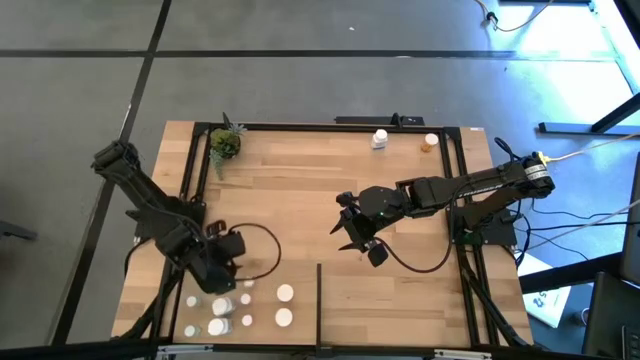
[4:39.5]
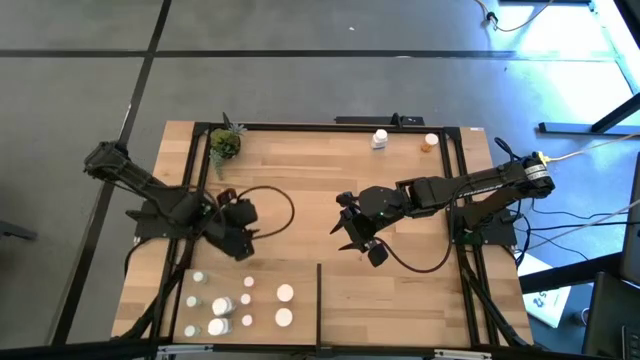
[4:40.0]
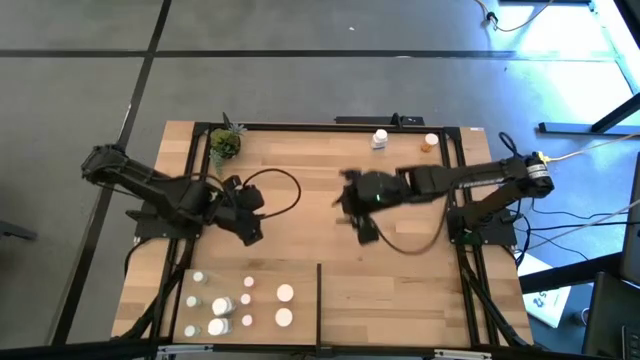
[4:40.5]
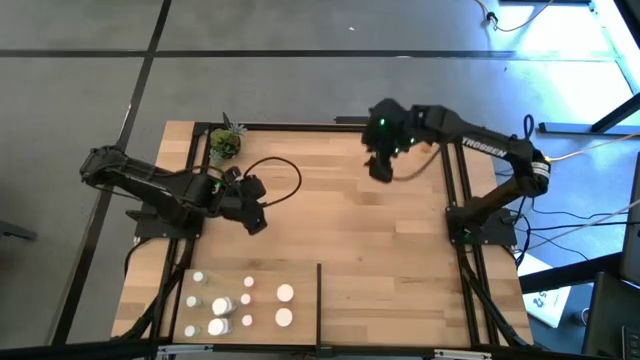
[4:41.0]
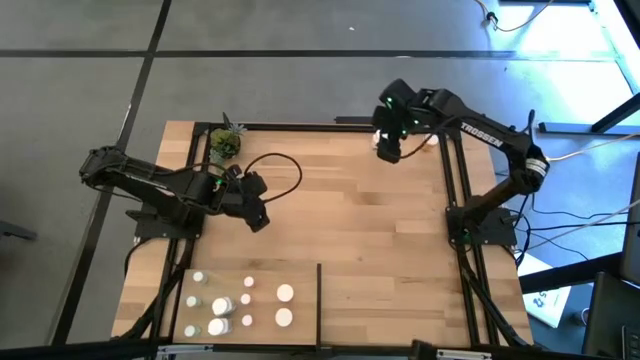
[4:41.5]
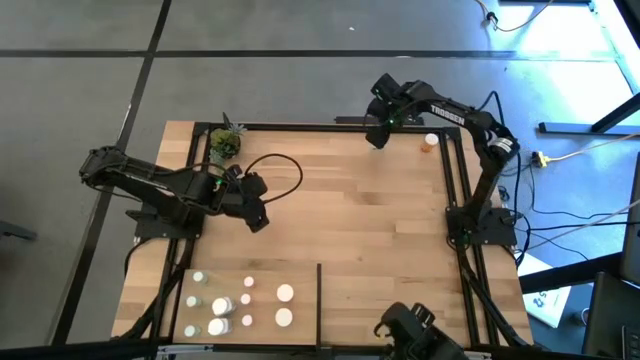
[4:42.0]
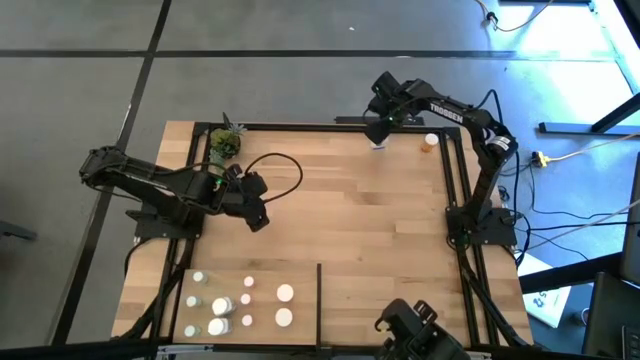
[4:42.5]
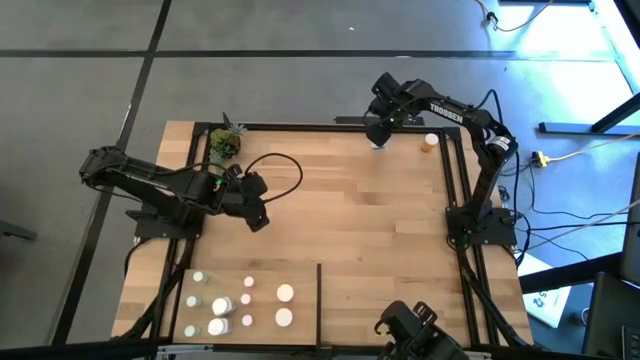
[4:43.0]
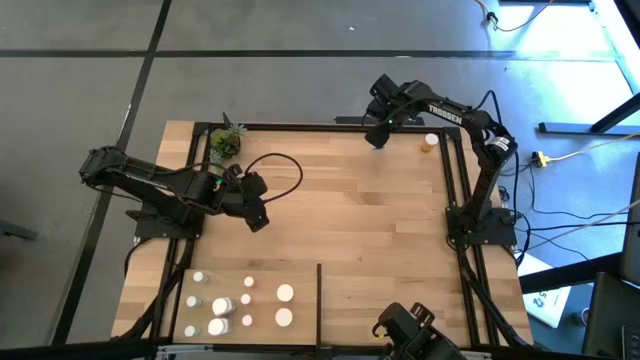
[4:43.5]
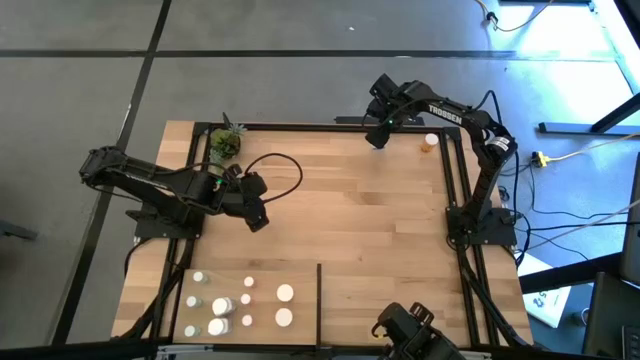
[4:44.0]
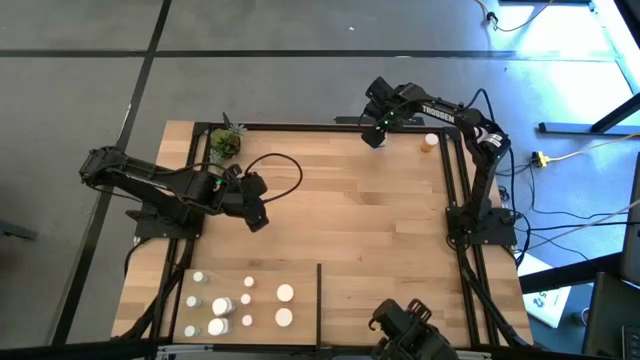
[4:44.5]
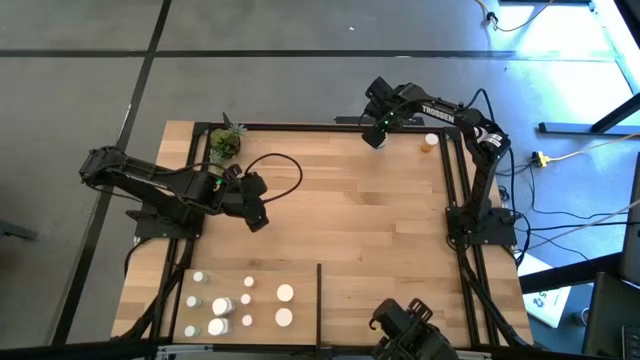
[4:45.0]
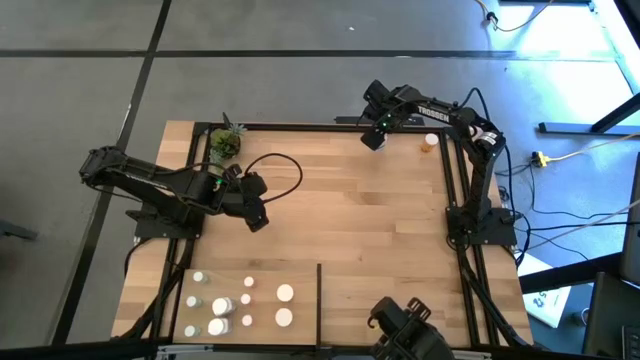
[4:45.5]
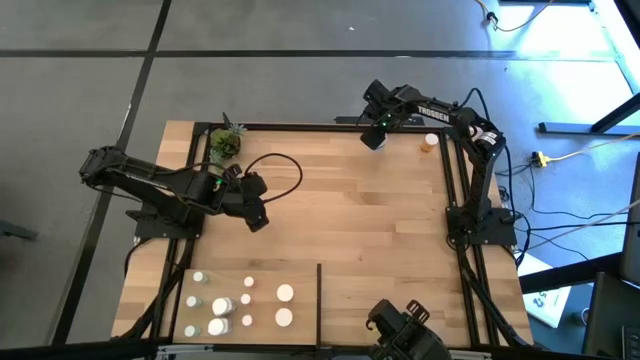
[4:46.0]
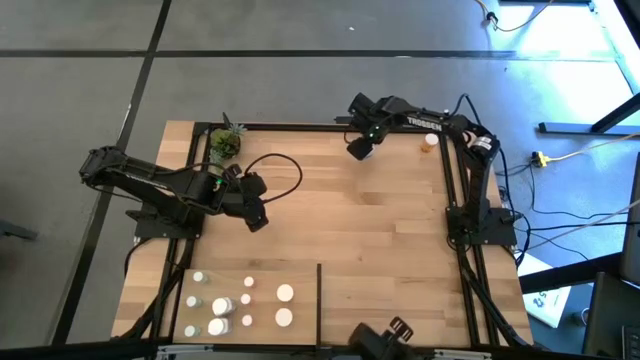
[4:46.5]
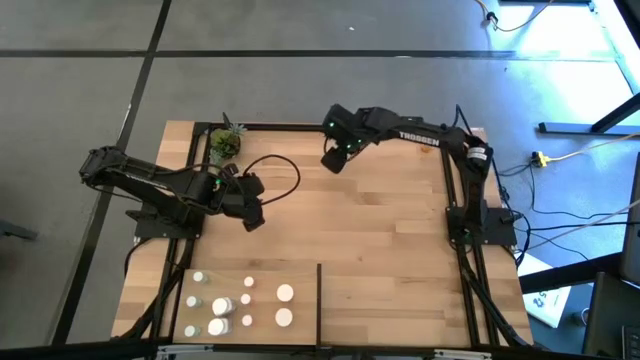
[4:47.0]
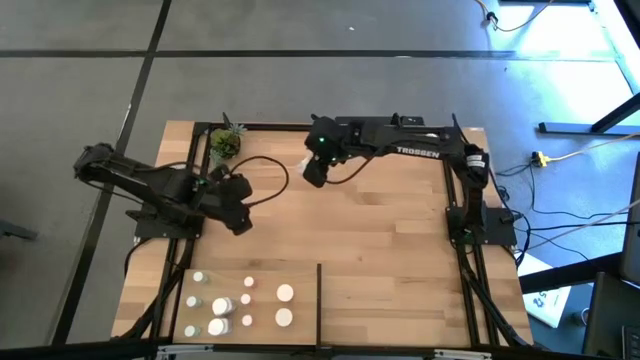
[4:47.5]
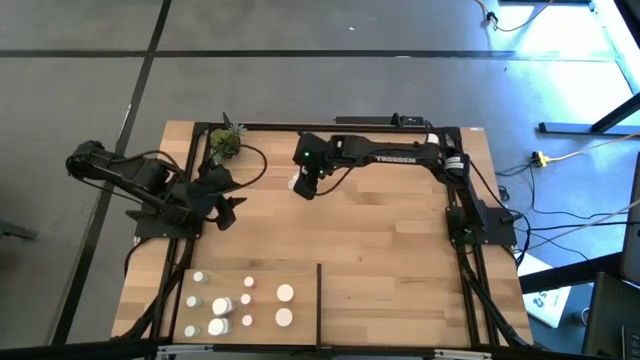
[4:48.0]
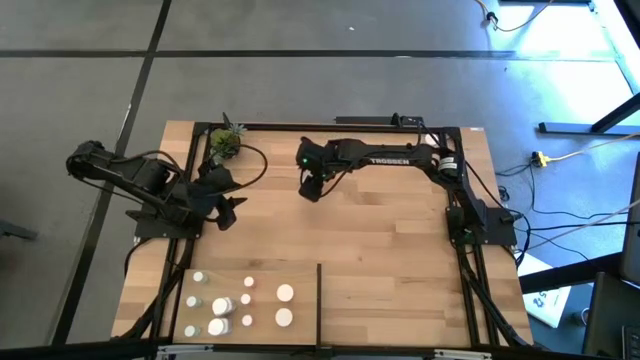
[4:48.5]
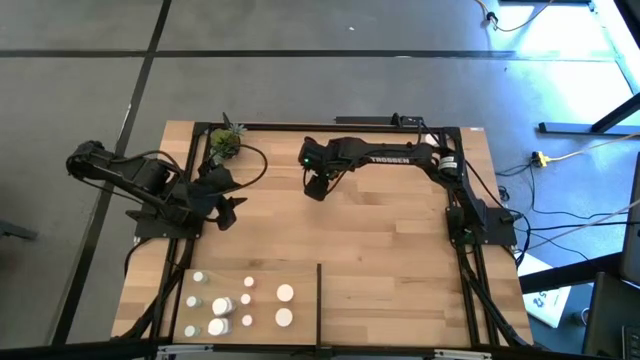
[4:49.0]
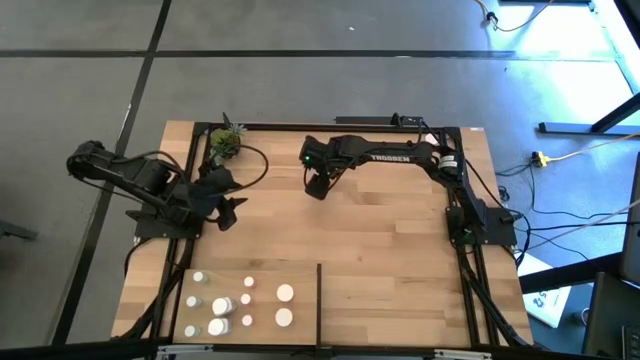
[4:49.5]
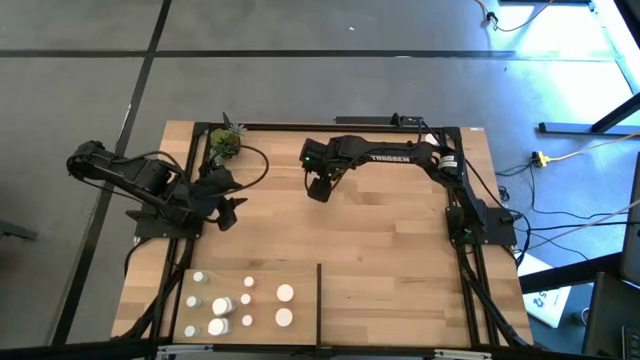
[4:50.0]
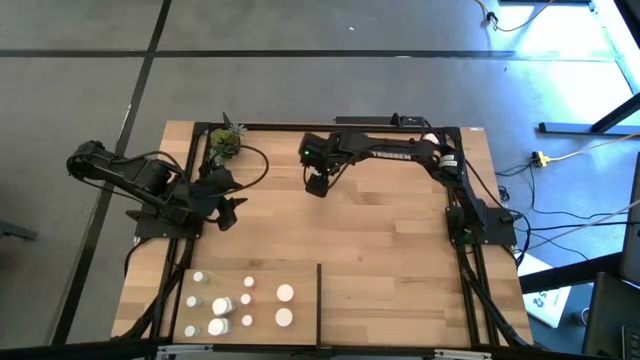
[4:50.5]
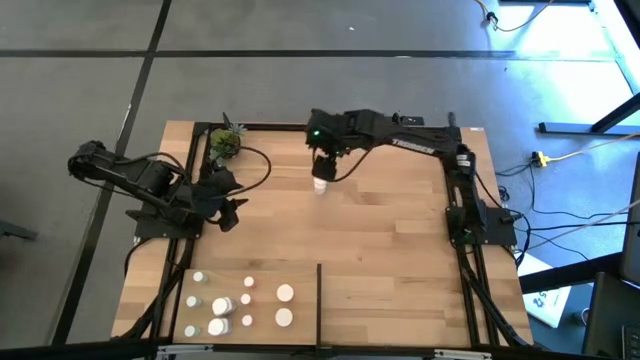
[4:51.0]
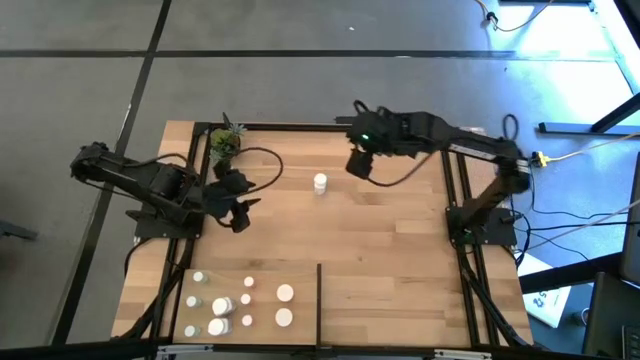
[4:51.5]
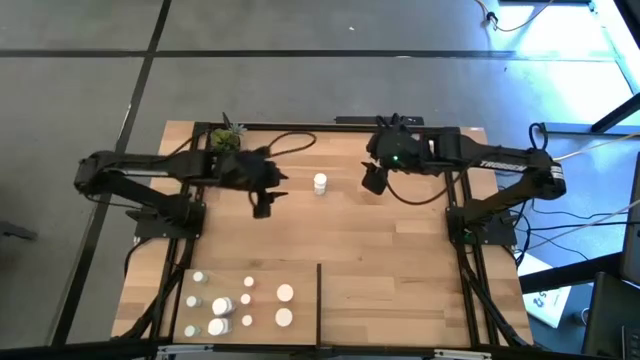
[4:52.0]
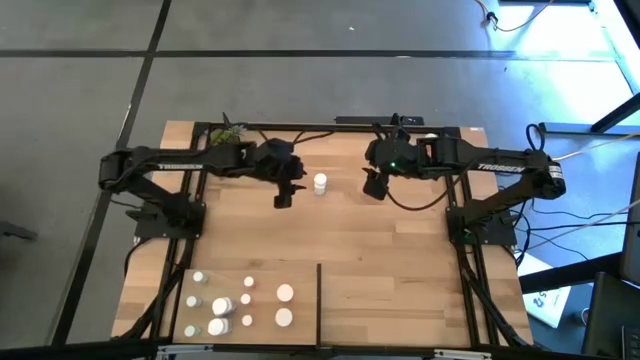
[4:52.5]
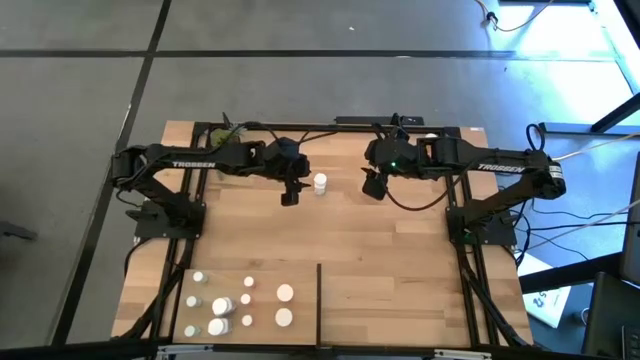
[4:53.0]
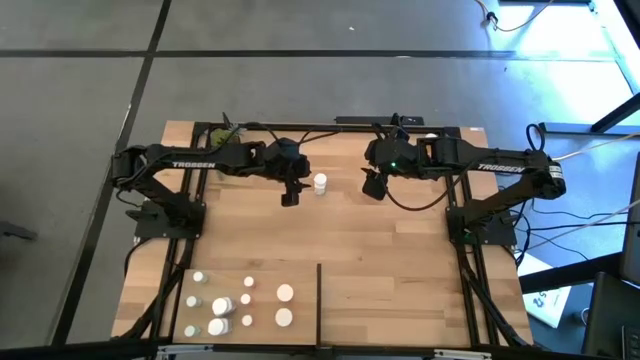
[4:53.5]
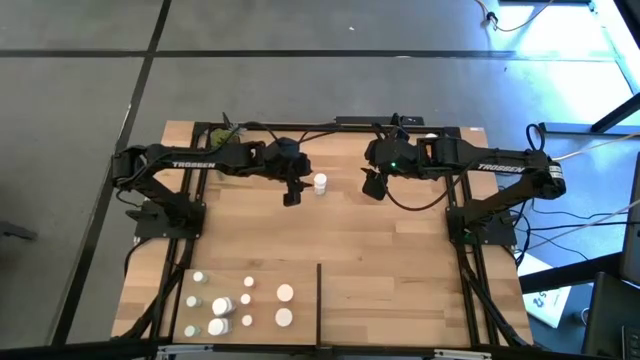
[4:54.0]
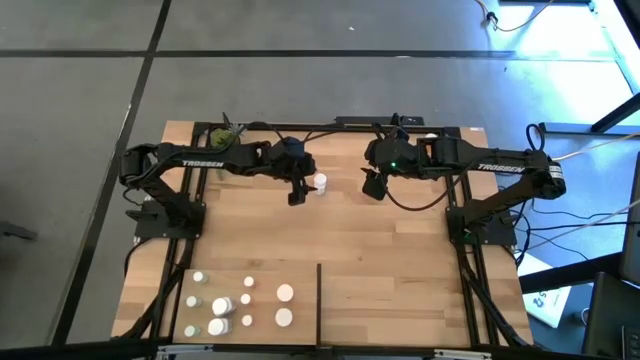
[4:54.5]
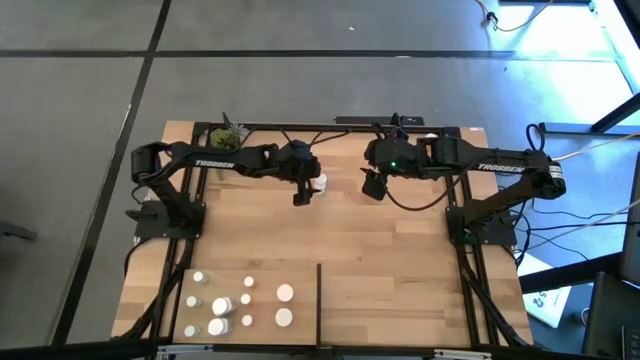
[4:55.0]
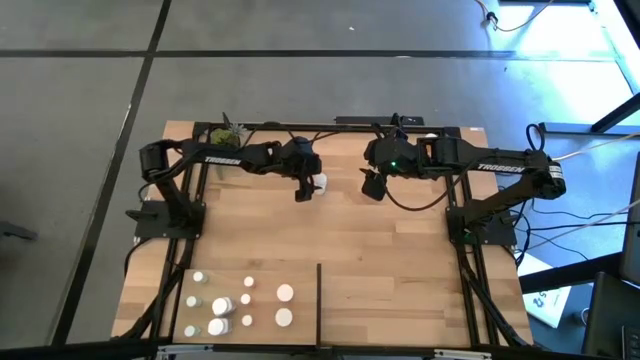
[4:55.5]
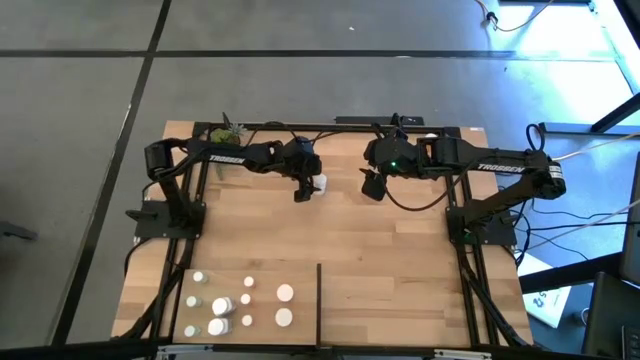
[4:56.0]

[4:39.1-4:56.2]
Task: Pick and place medicine bottles onto shelf by color
Put the white pill bottle on the shelf aligned with the other white pill bottle

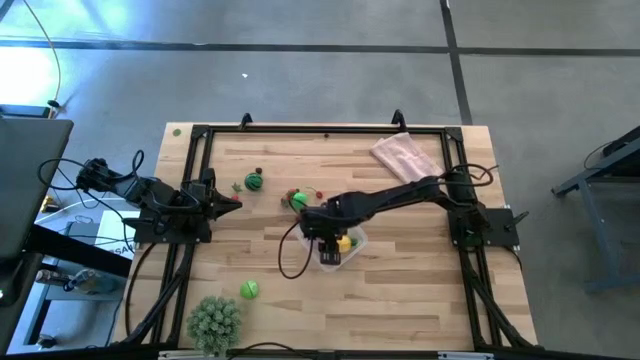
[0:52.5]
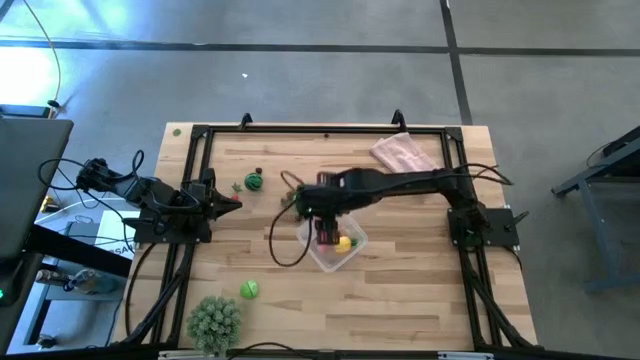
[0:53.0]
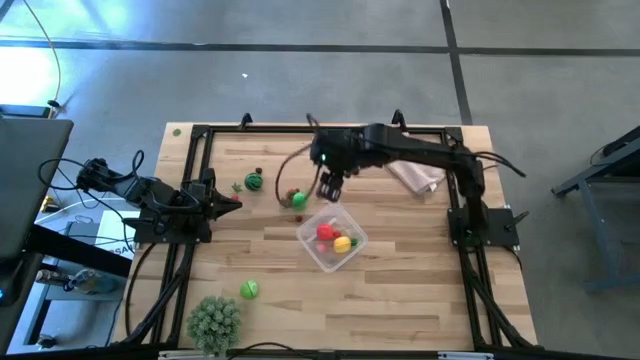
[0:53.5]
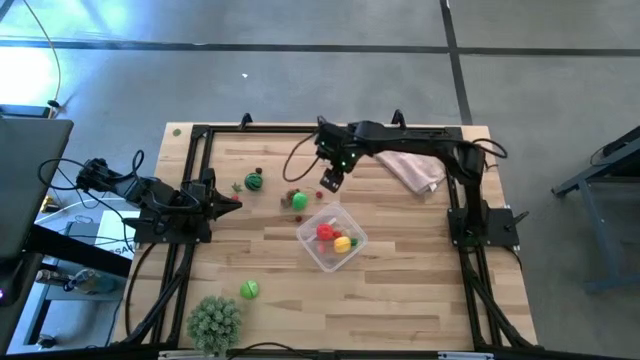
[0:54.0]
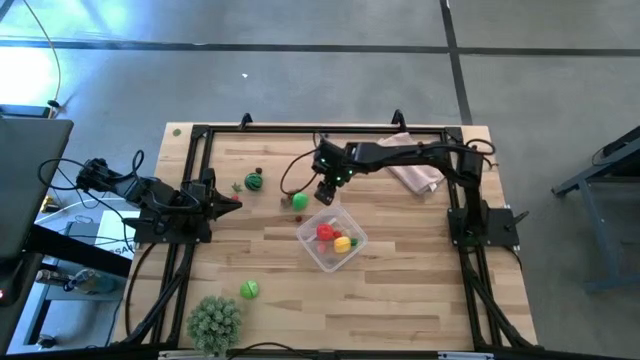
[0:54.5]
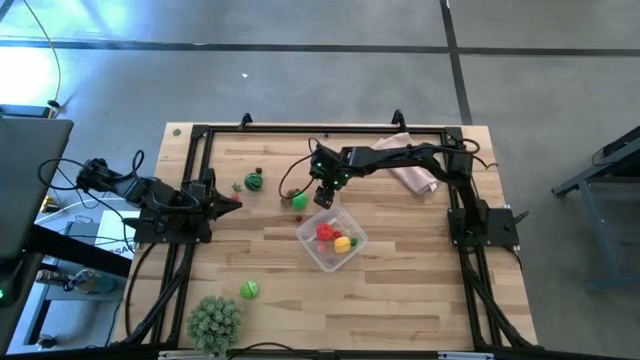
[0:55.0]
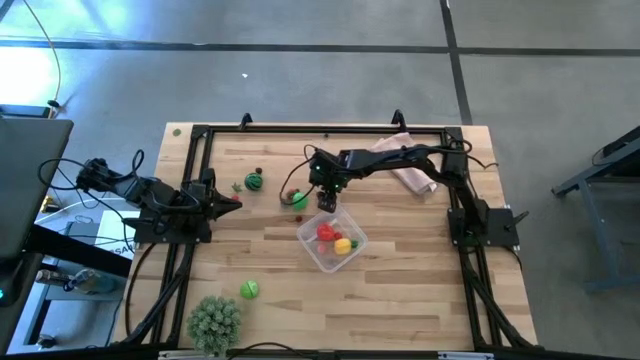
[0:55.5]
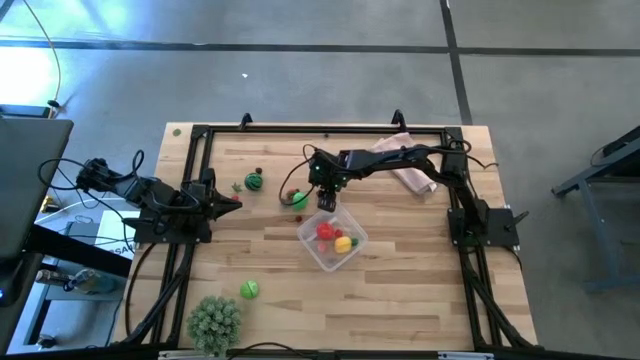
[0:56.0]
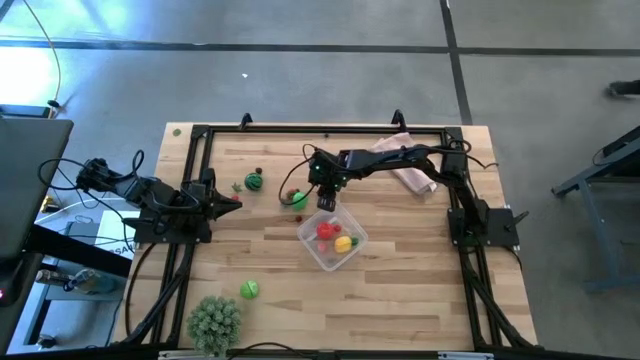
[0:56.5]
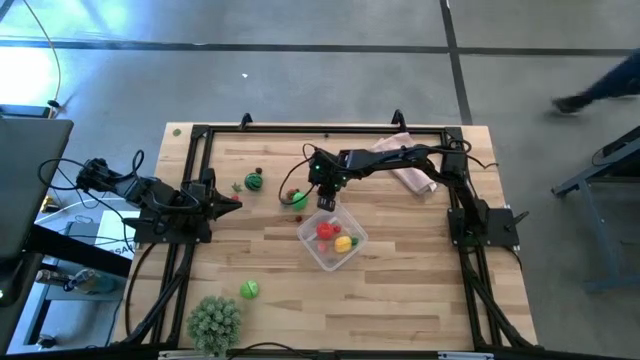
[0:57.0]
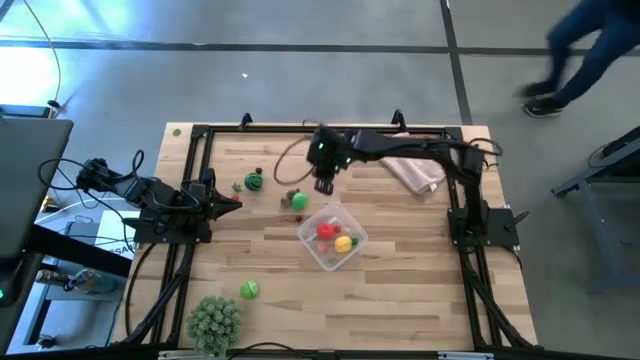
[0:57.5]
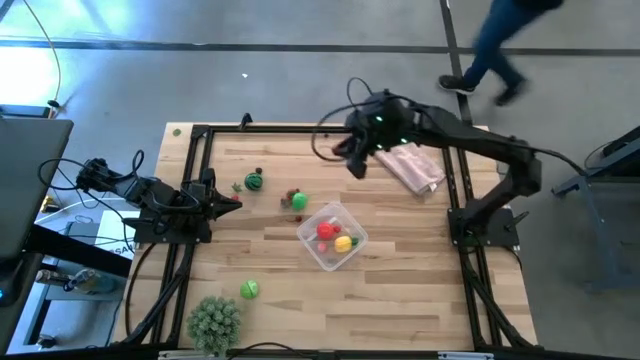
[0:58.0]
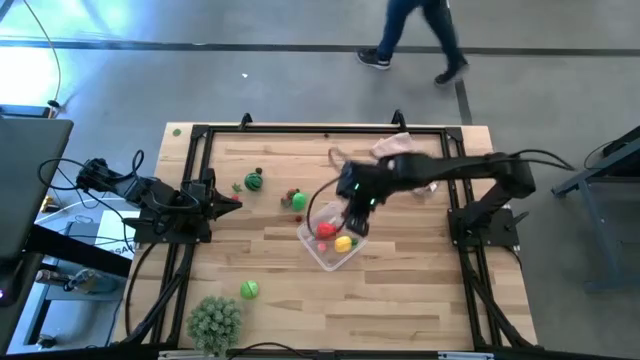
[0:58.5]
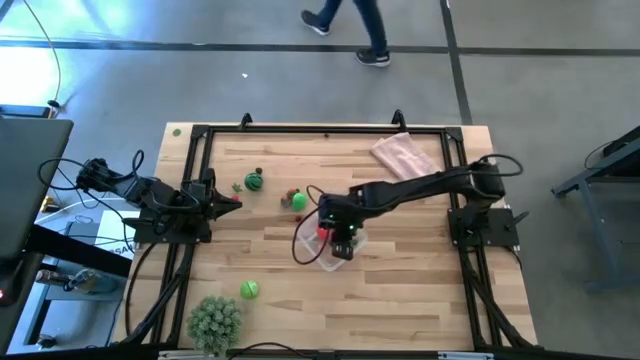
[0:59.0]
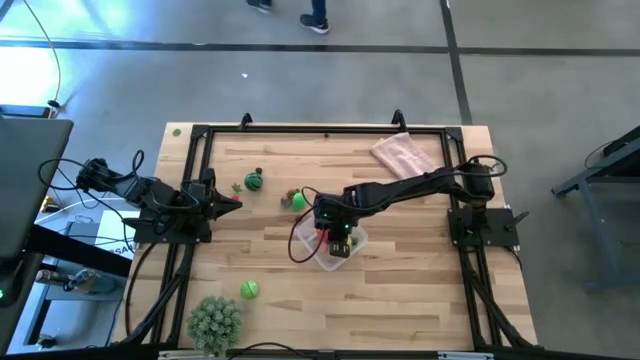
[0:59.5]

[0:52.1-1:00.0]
Task: Pick and placing Produce into tupperware
Put the red cherry into the transparent container
